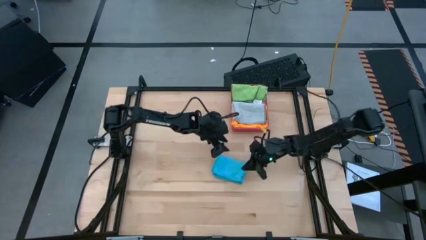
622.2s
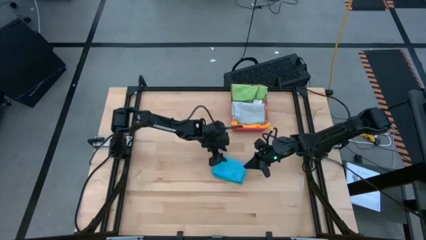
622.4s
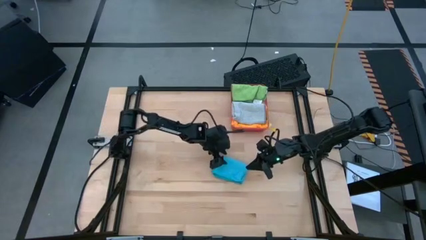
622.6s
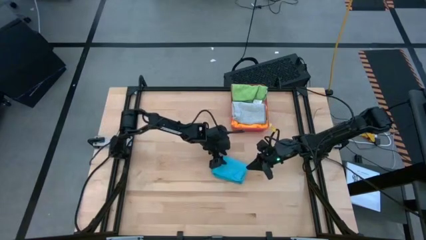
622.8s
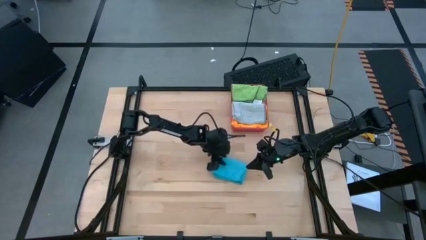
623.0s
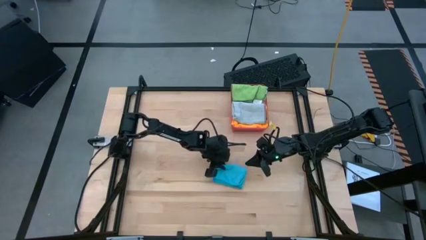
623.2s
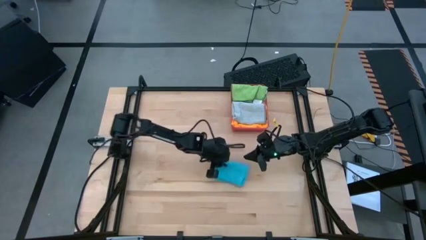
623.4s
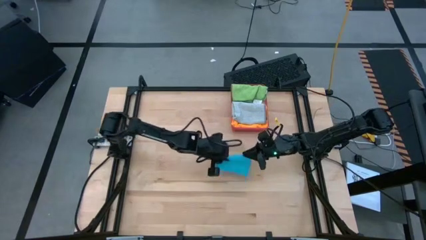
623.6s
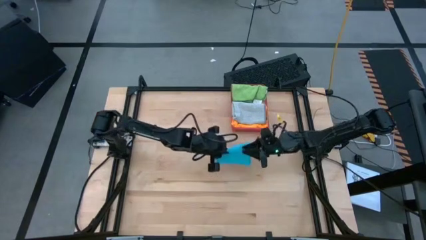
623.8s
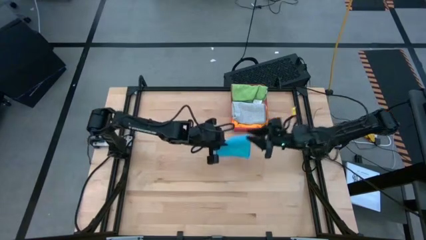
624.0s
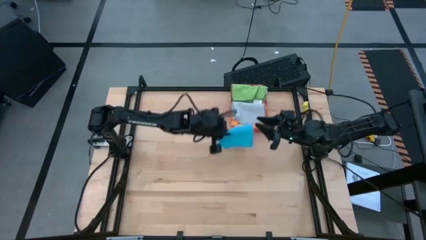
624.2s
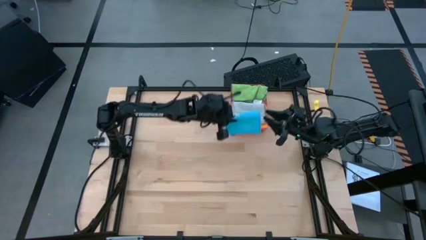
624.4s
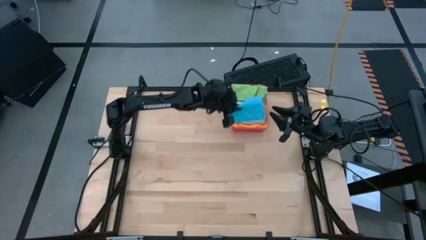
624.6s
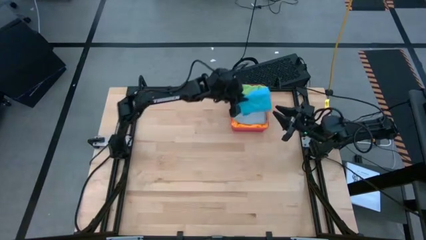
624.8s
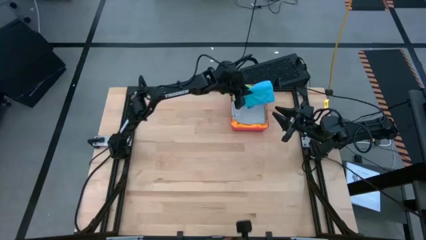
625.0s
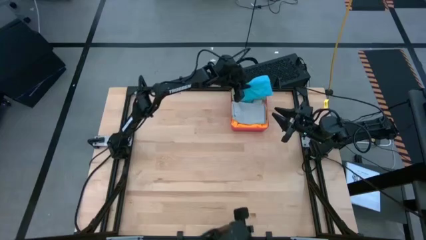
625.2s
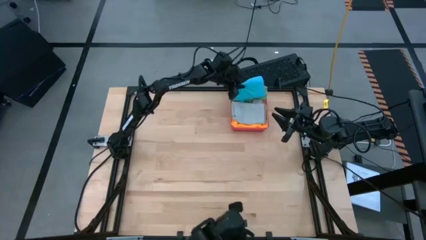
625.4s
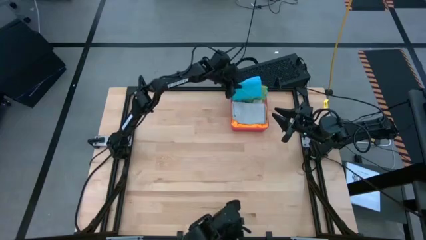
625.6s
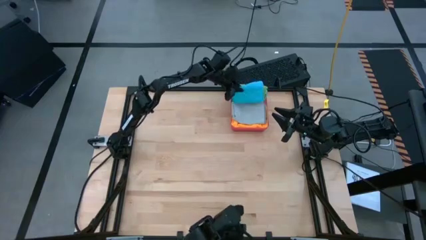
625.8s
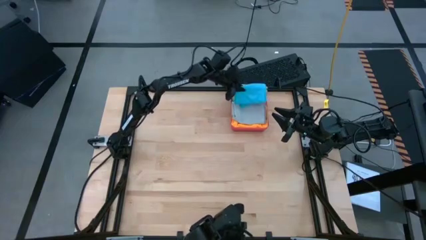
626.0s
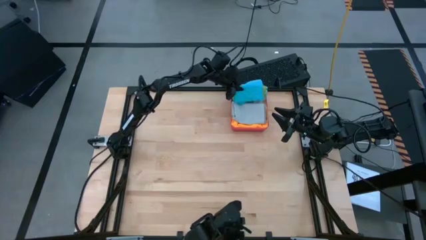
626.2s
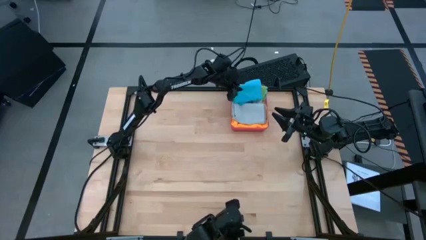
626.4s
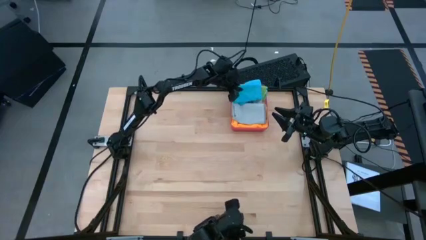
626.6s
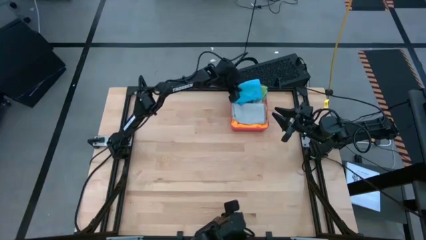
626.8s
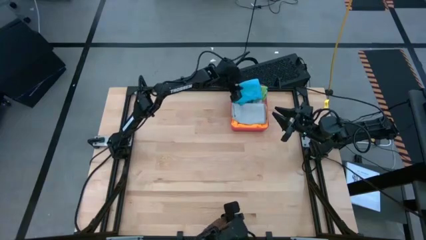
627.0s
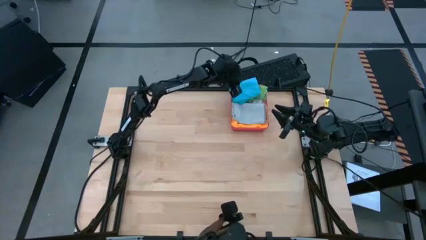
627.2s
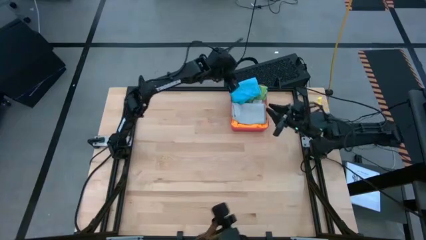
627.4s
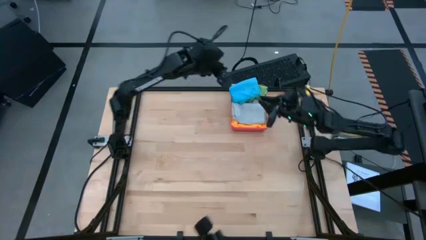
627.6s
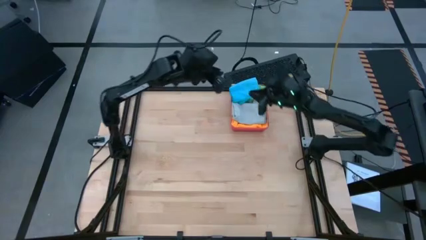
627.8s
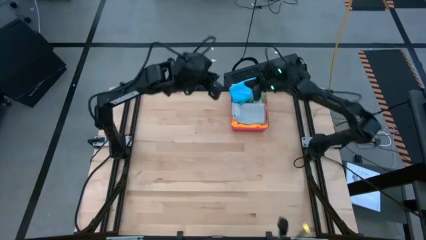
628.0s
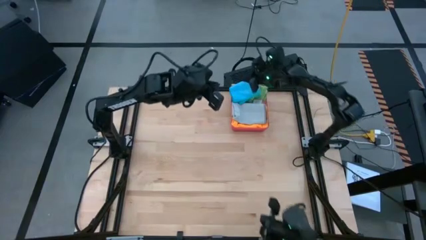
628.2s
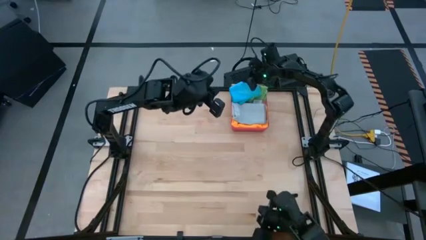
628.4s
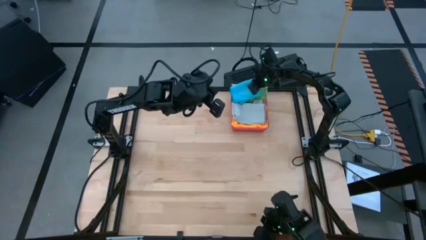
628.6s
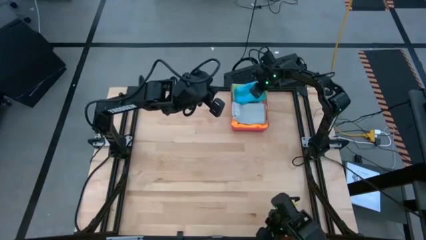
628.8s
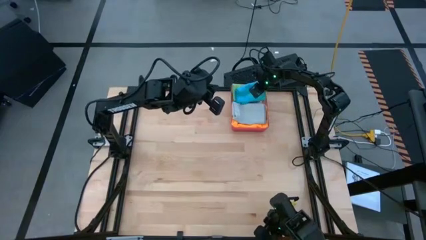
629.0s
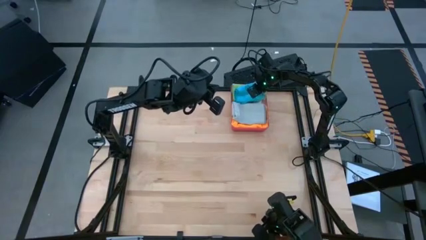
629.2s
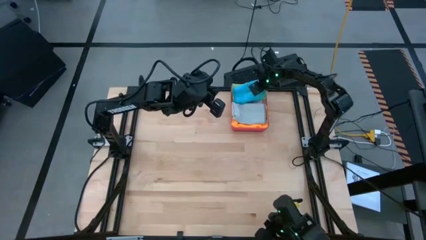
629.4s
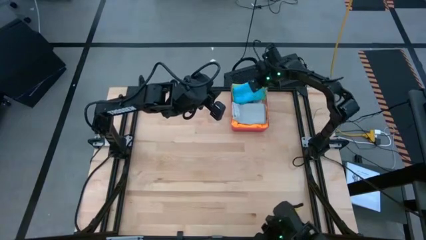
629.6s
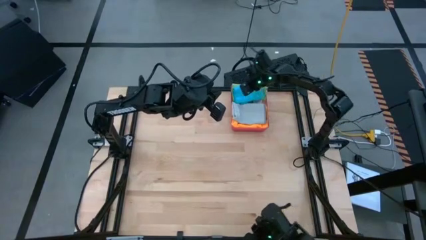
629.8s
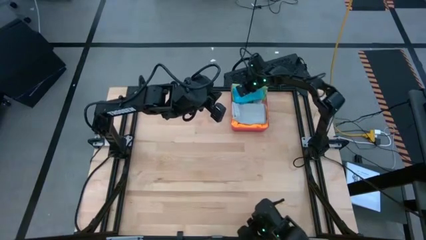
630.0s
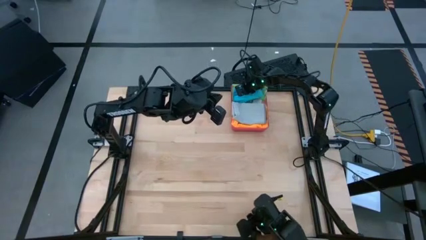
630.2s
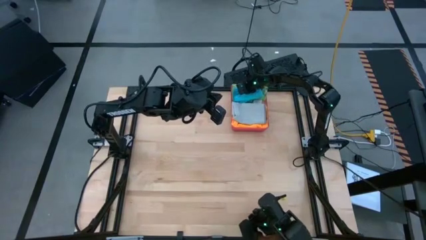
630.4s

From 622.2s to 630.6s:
Task: Fold microfiber towels
Stack the blue microfiber cloth on top of the dark green microfiber cloth in the red bin

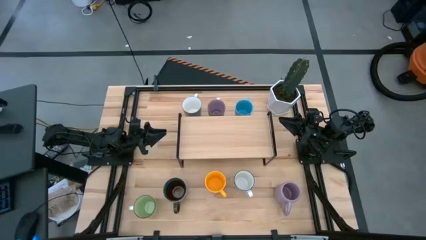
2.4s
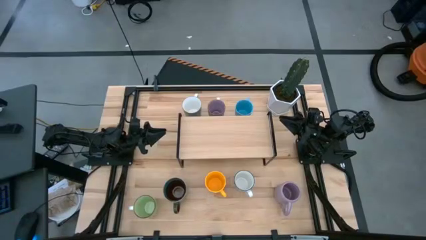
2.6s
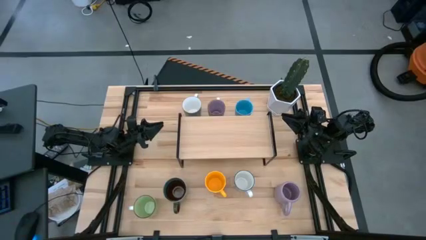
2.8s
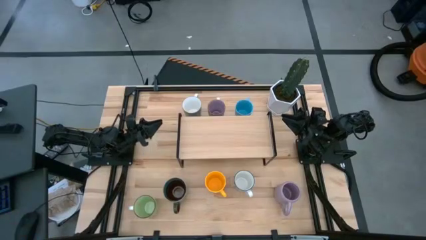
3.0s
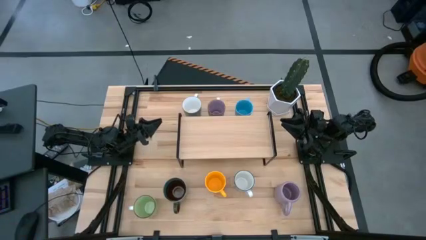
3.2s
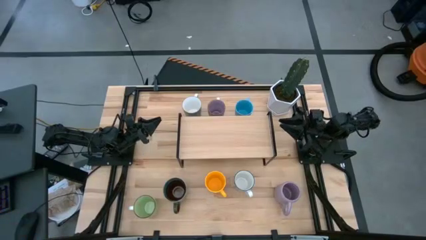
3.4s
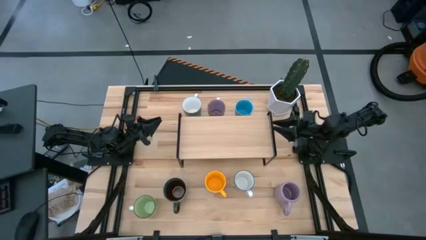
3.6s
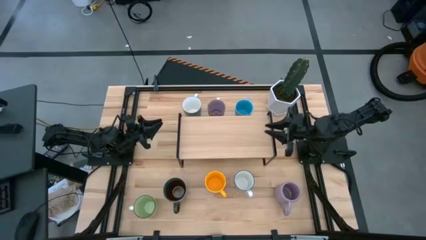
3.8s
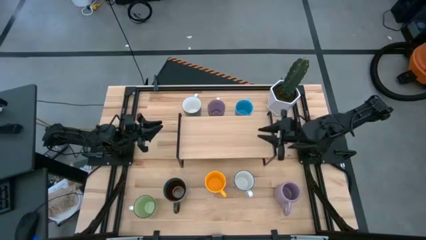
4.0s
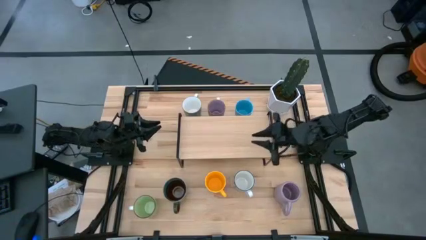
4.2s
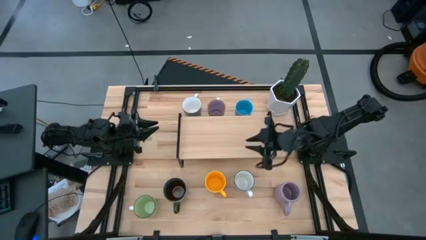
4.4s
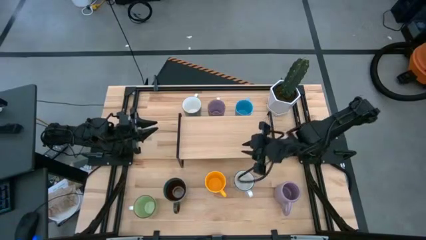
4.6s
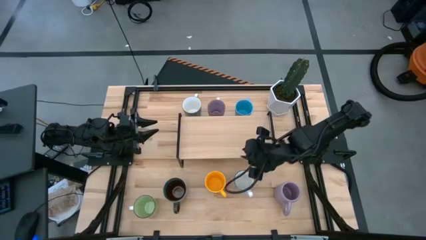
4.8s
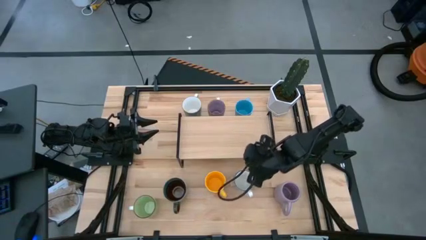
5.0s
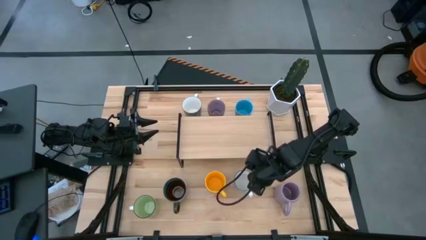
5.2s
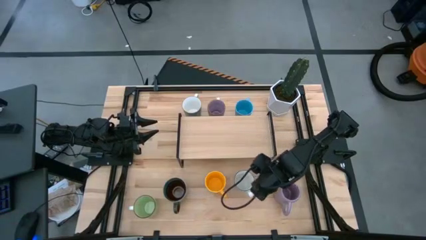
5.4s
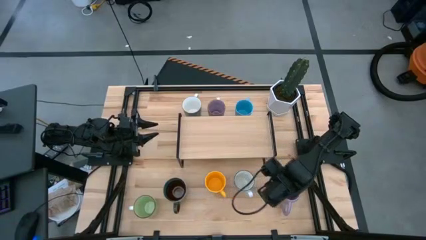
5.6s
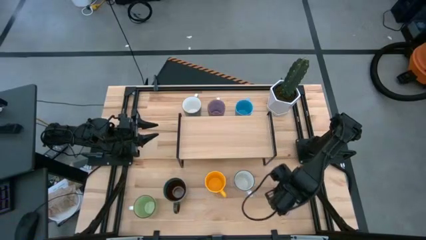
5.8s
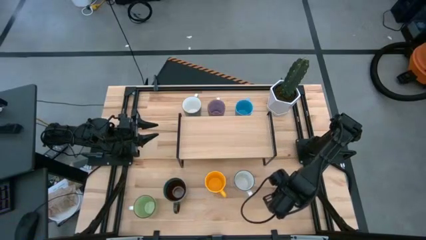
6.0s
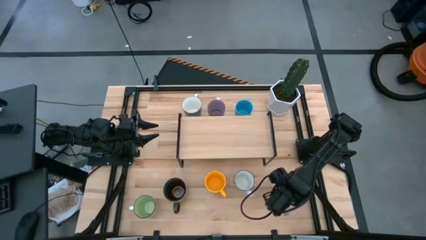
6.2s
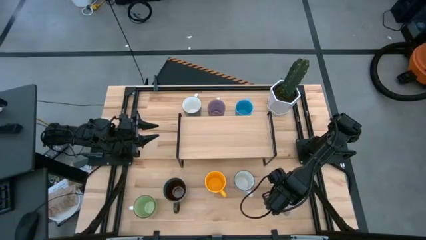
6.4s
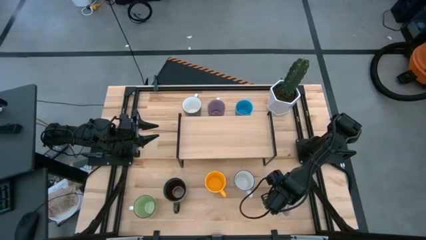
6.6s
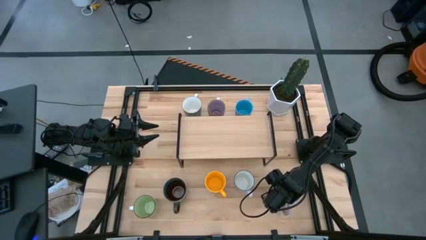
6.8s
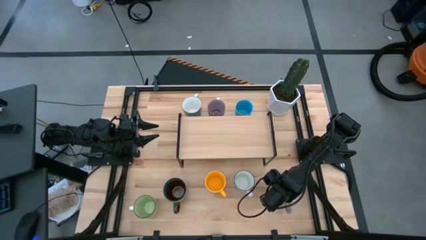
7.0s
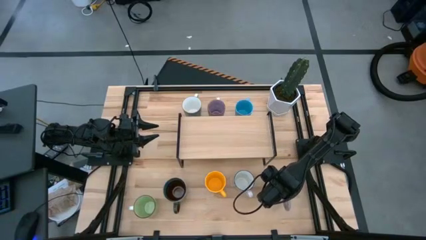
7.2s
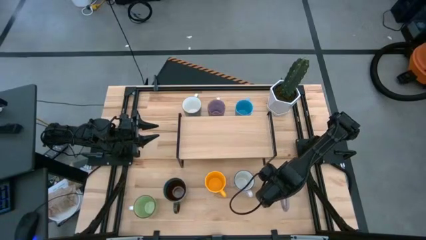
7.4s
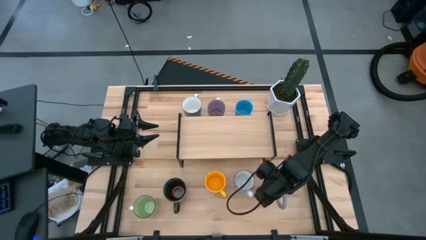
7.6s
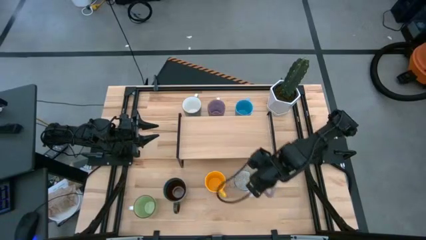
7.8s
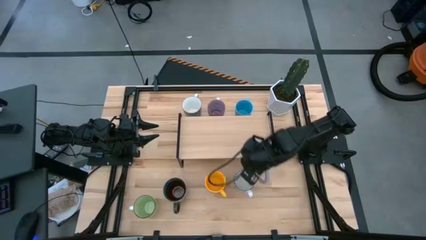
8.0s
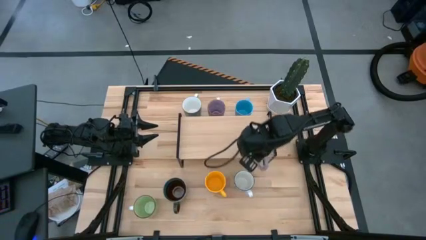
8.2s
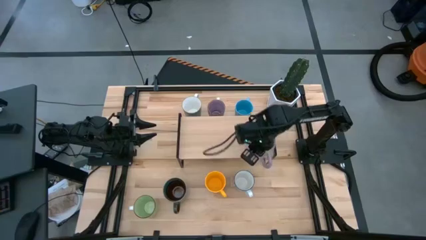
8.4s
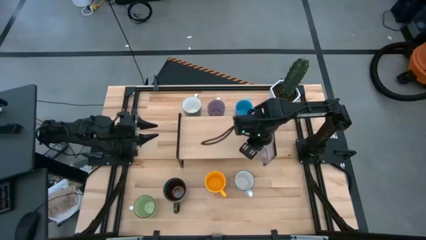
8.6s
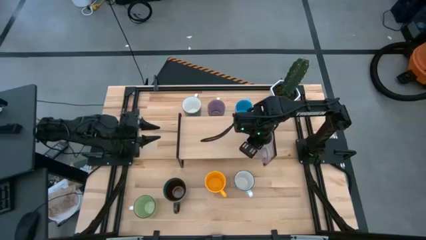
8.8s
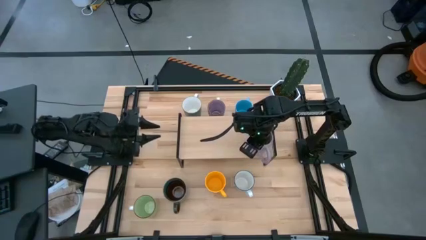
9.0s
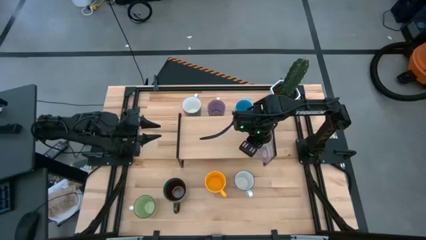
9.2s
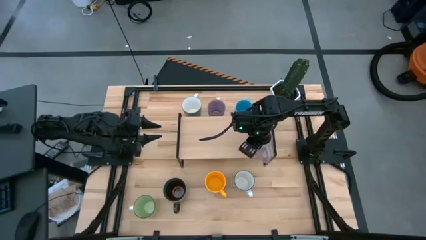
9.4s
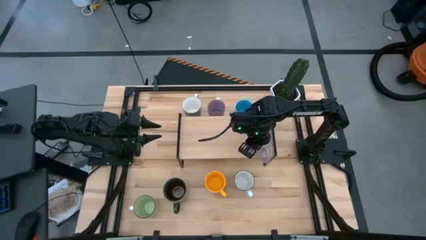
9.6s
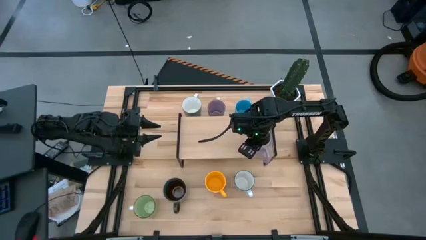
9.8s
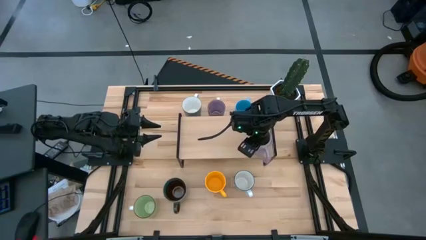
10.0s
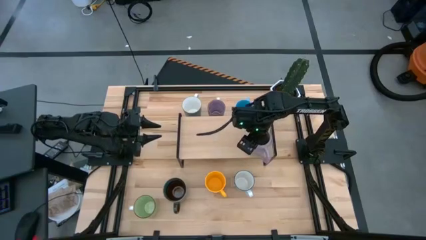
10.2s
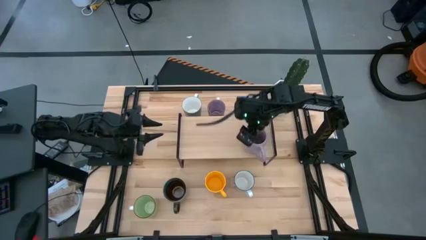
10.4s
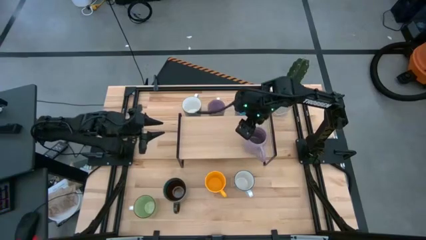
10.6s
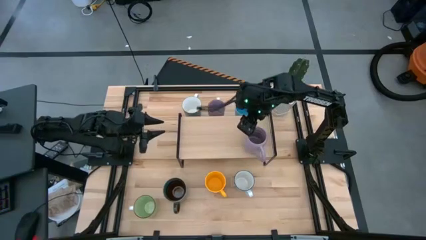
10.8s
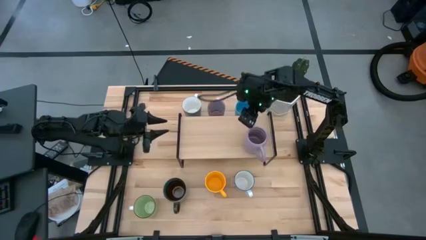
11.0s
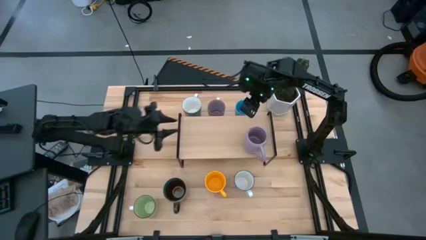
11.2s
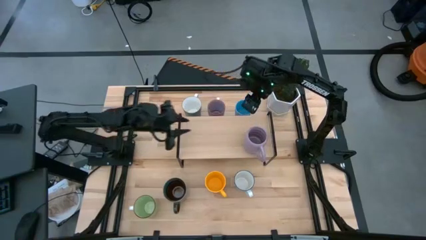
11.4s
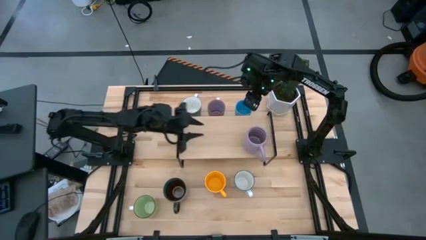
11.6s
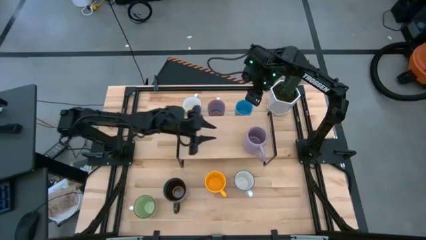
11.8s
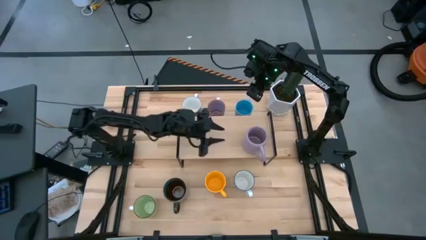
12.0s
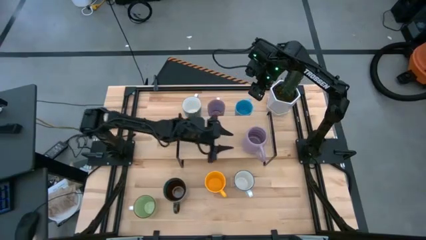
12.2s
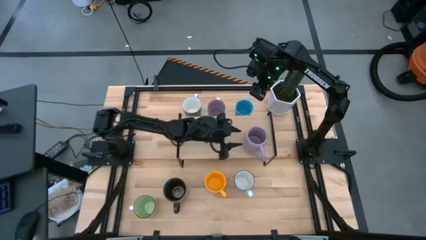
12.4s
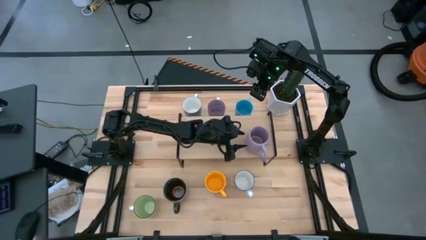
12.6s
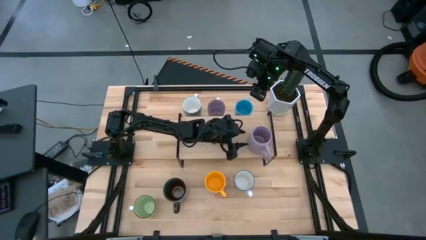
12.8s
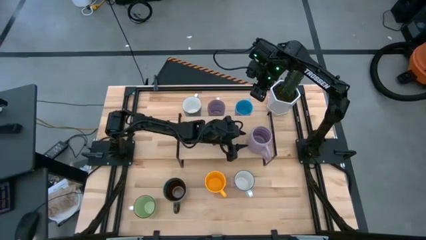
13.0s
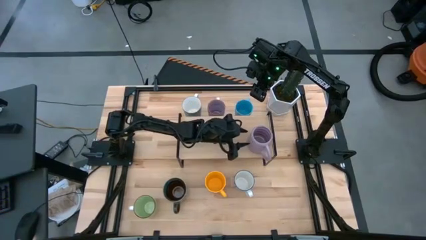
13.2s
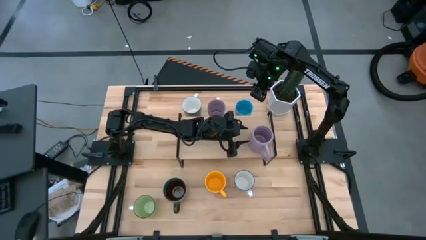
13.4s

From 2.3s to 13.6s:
Task: Place coffee mugs
Put the purple cup on the shelf
